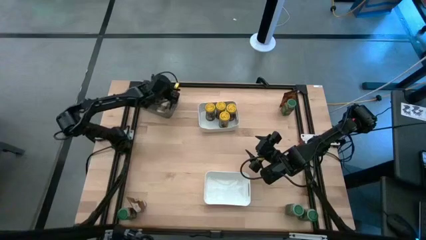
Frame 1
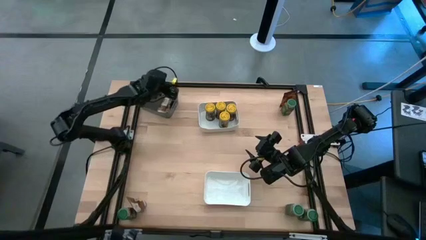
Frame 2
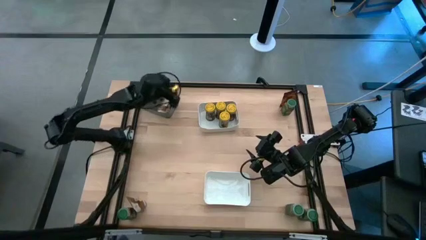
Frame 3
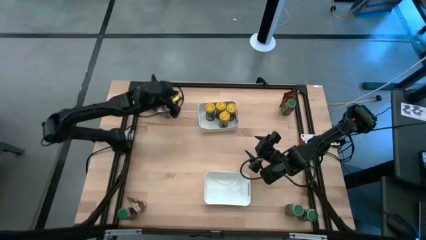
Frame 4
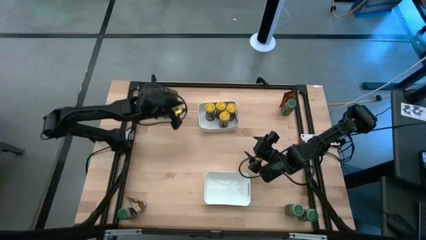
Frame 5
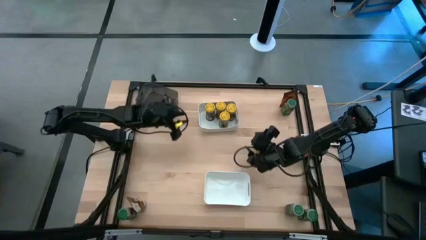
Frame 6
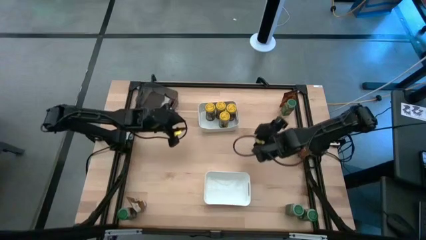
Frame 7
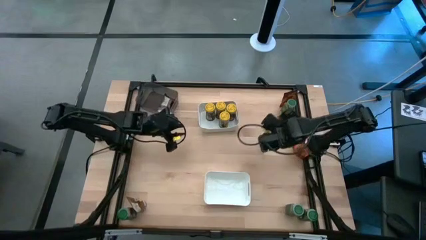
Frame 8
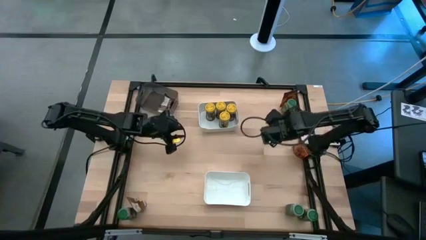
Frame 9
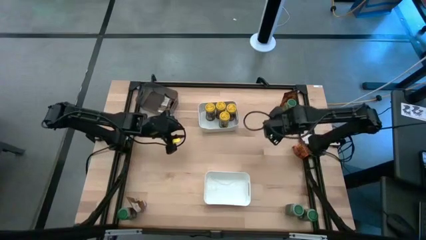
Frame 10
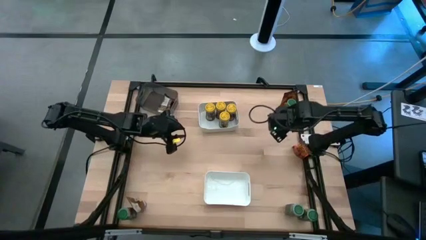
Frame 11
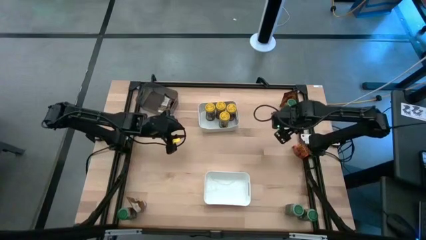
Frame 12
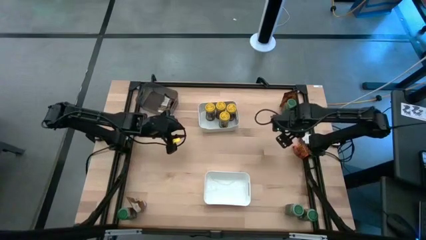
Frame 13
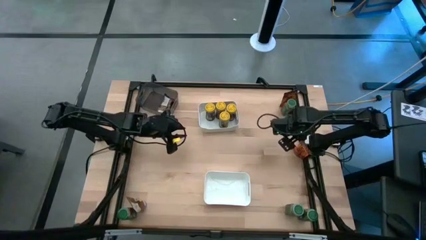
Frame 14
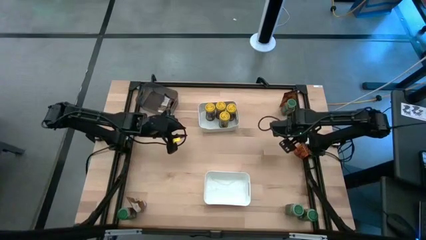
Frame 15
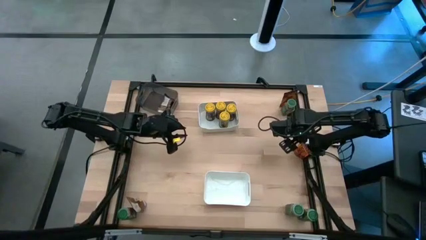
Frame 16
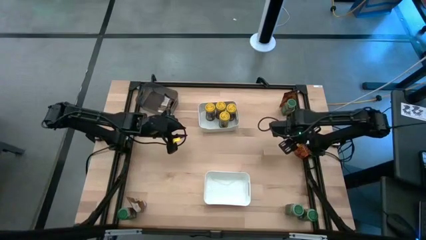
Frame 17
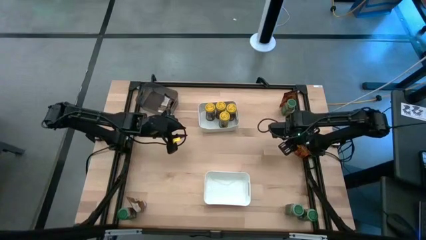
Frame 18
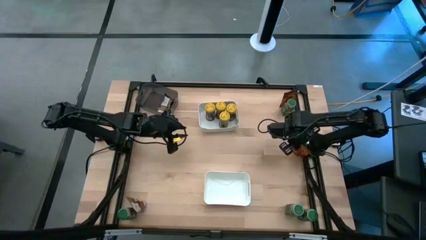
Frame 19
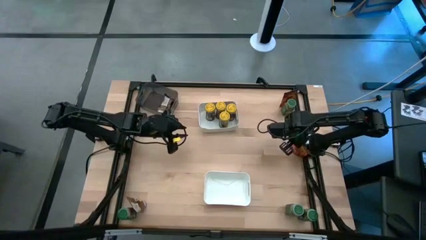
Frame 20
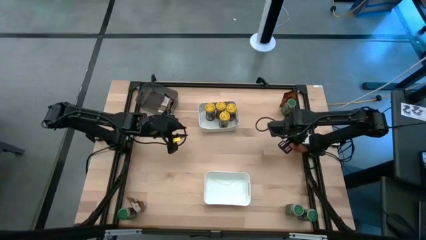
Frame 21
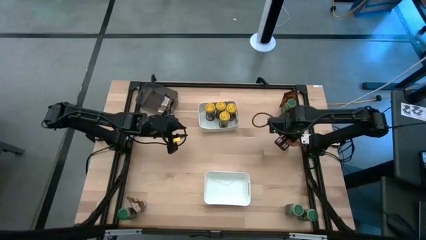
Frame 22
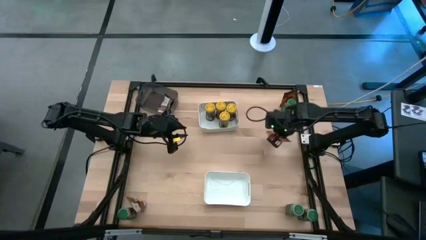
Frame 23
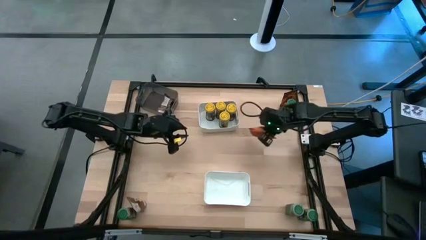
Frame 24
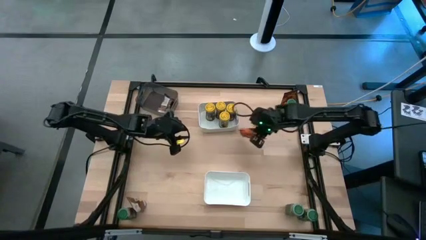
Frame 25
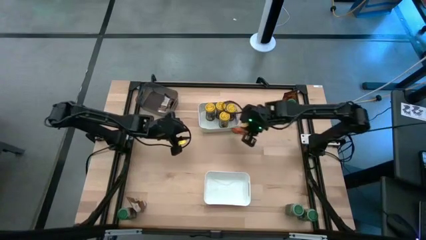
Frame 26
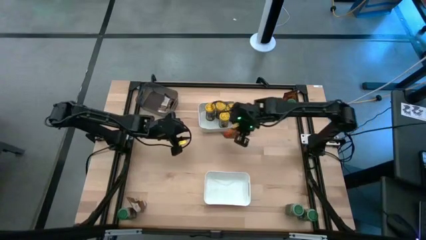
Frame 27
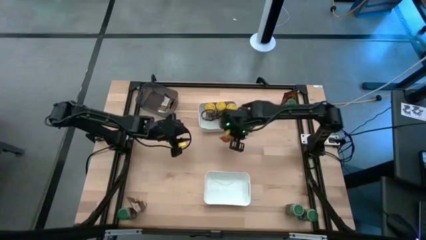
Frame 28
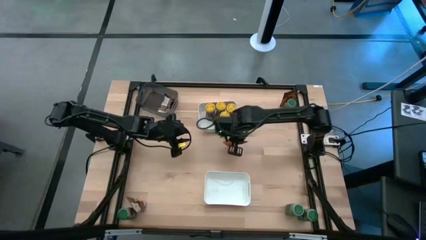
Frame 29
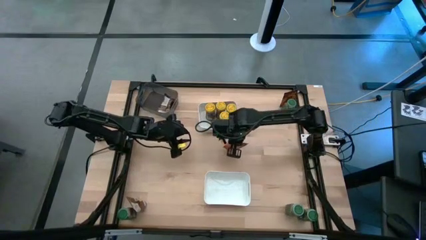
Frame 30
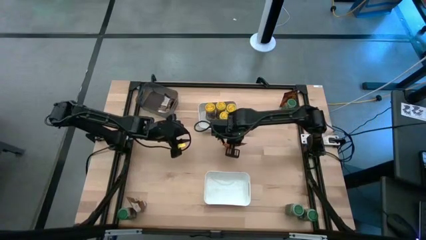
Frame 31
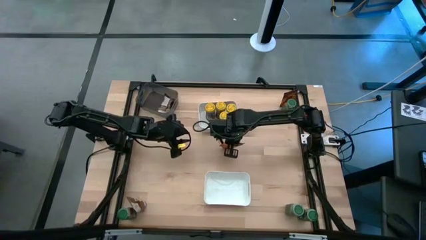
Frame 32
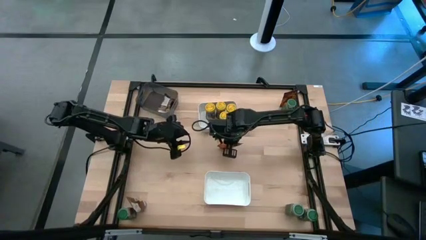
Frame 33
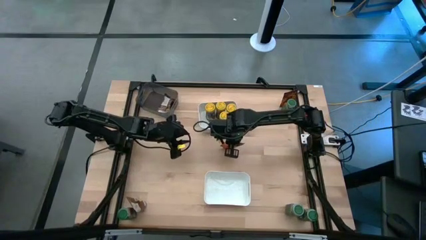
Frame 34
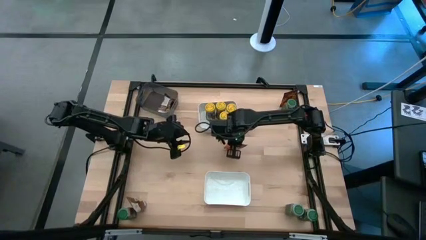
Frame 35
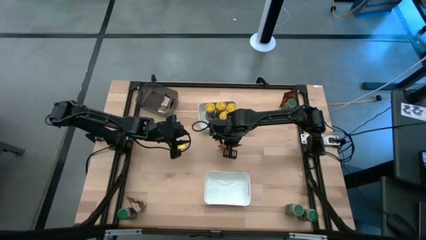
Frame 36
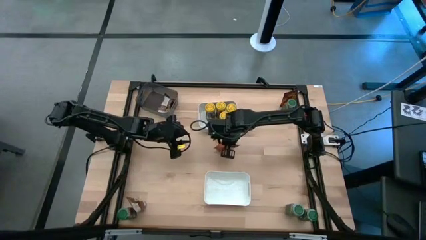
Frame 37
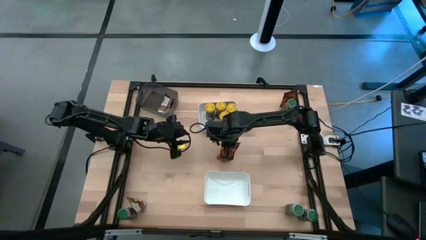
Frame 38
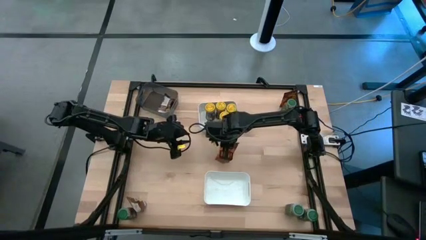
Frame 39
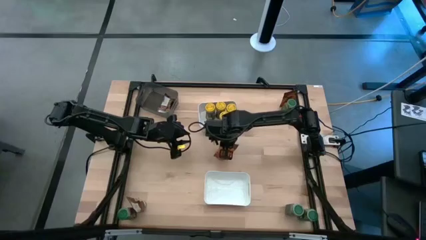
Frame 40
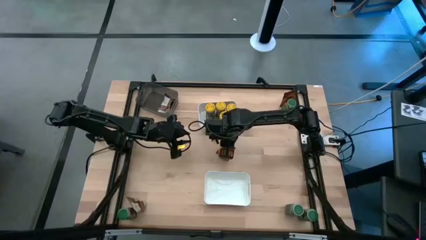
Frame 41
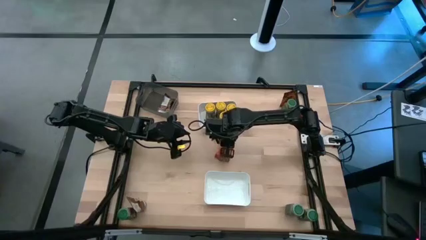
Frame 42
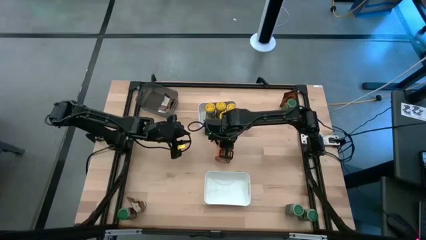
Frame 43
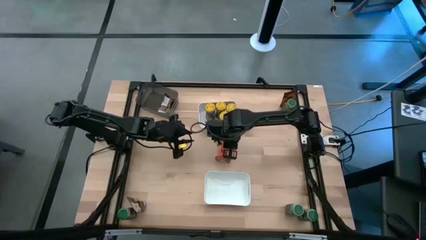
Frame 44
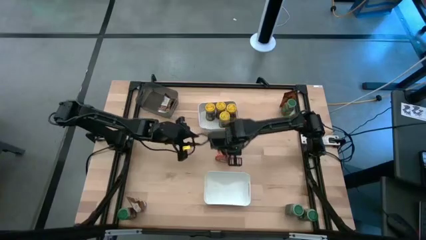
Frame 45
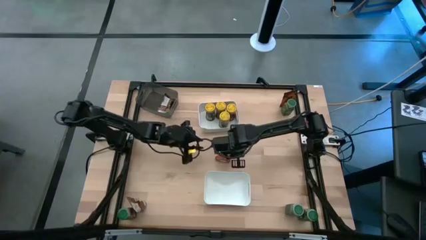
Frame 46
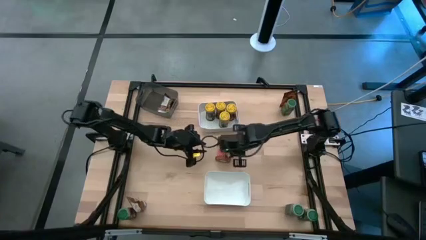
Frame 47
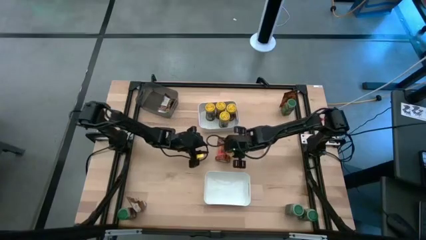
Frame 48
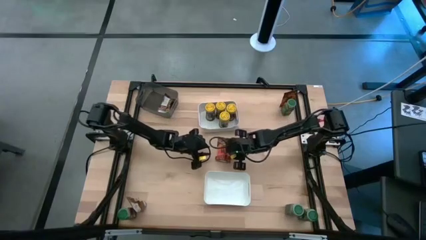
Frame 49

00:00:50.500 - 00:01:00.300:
Task: Sort spices by type
Put the orange seasoning pack into the black bin

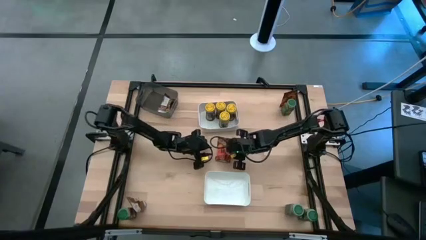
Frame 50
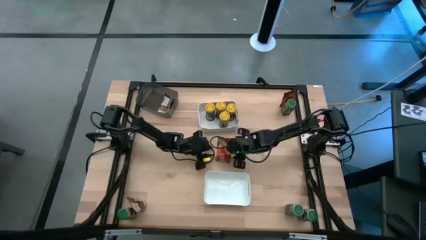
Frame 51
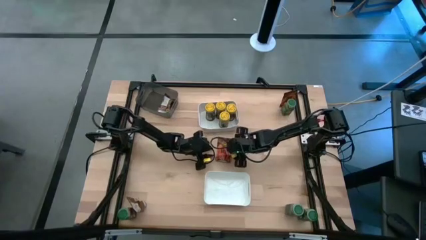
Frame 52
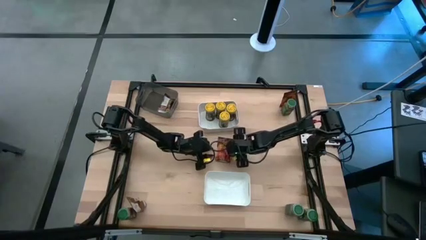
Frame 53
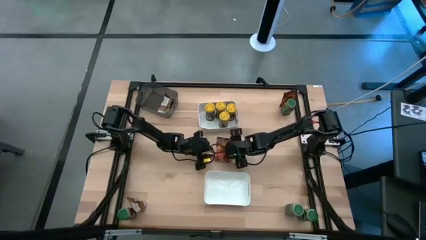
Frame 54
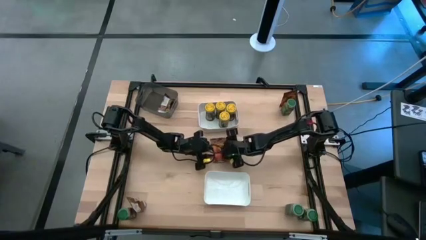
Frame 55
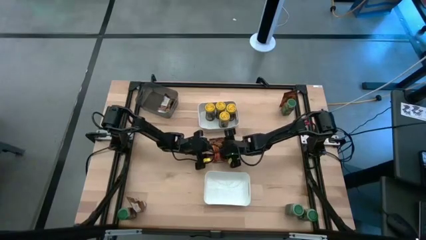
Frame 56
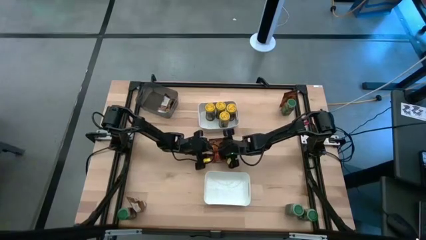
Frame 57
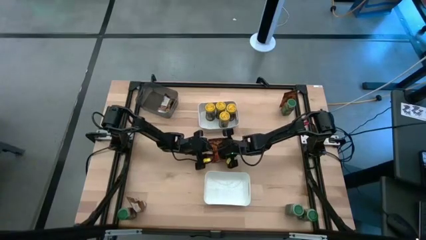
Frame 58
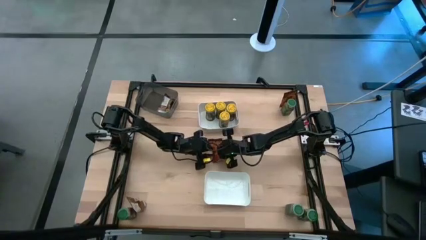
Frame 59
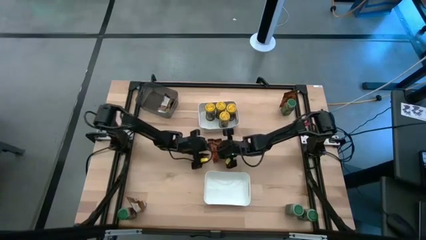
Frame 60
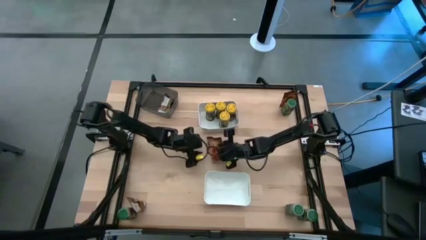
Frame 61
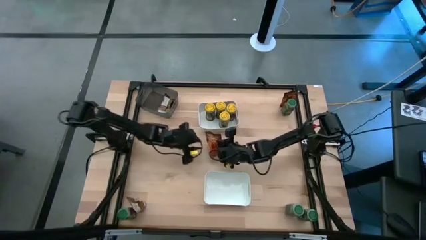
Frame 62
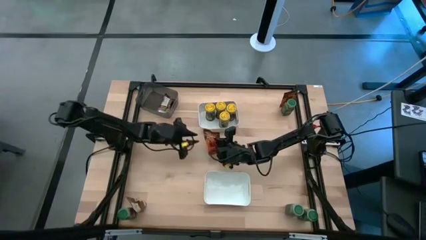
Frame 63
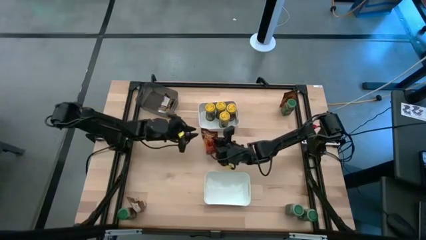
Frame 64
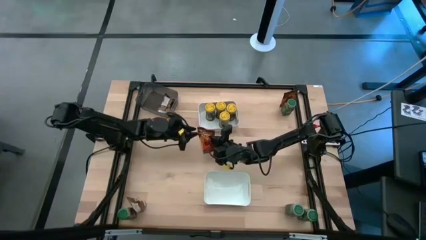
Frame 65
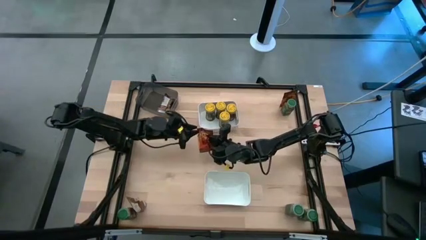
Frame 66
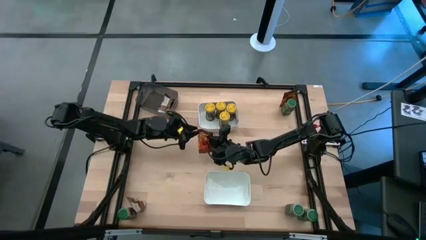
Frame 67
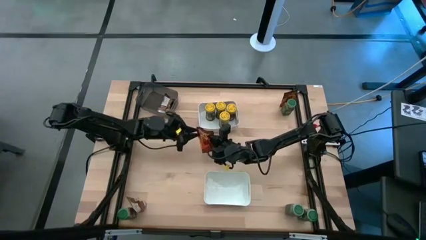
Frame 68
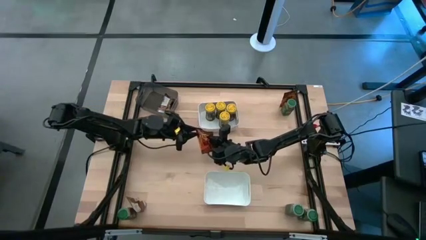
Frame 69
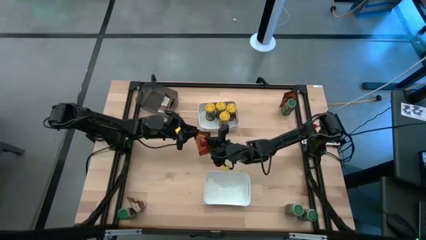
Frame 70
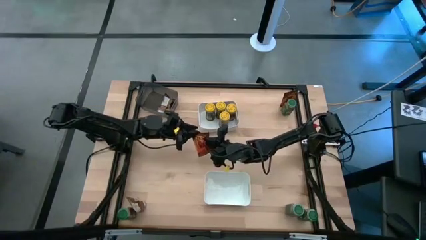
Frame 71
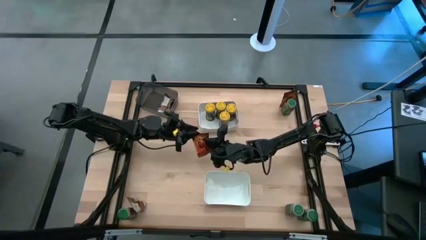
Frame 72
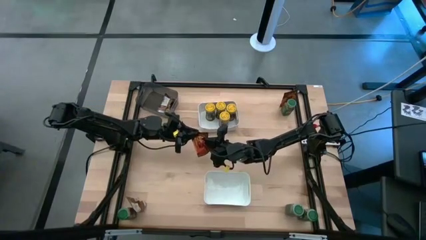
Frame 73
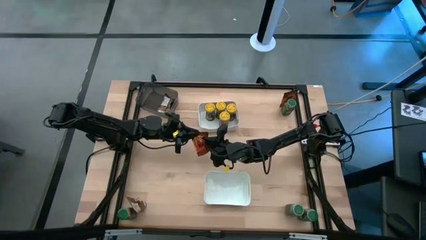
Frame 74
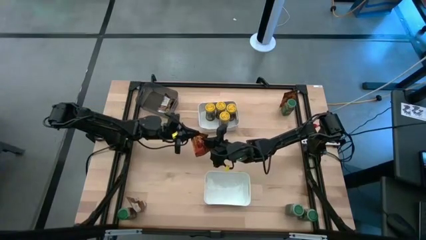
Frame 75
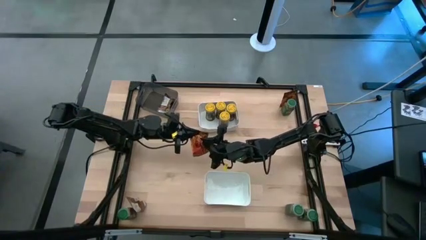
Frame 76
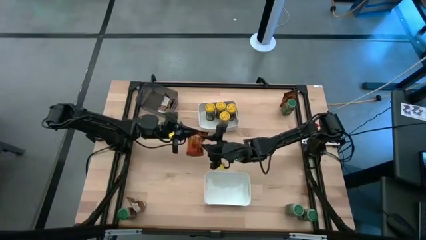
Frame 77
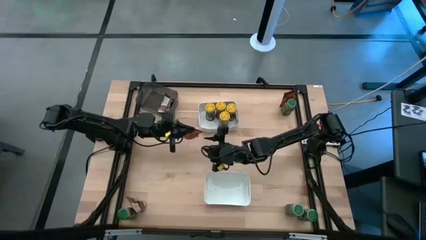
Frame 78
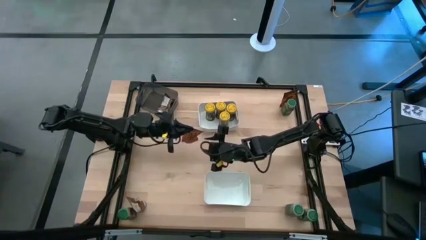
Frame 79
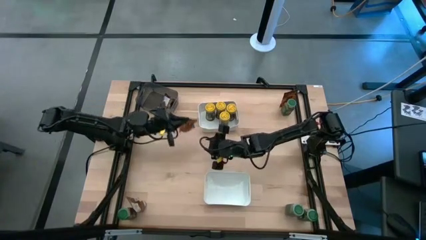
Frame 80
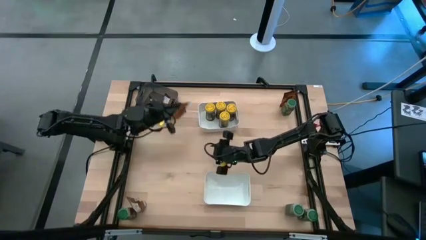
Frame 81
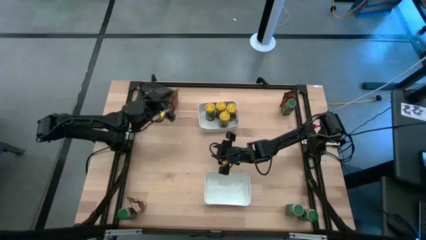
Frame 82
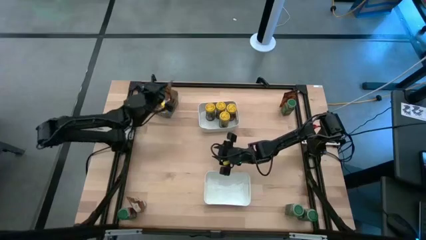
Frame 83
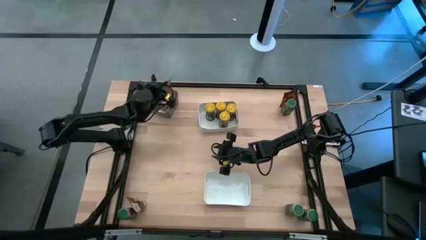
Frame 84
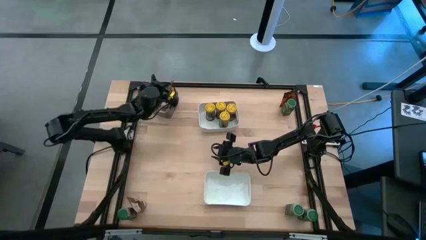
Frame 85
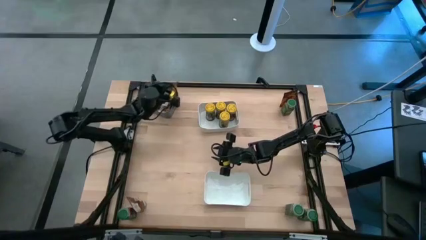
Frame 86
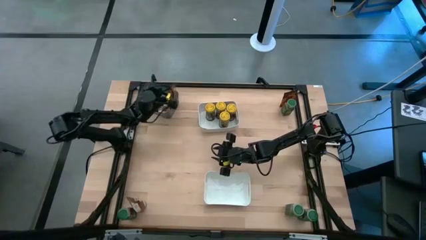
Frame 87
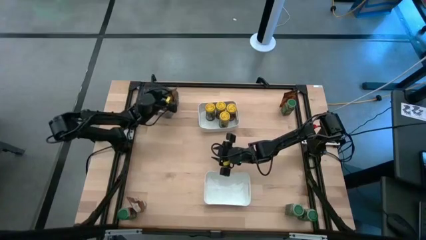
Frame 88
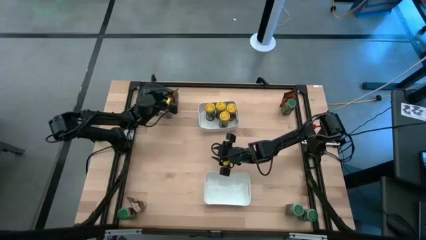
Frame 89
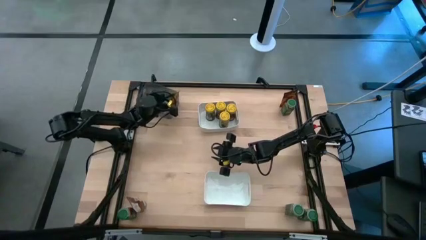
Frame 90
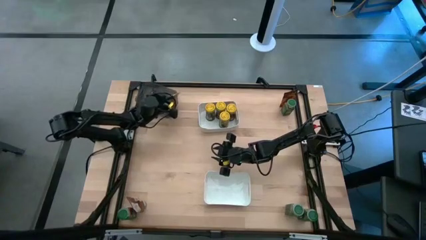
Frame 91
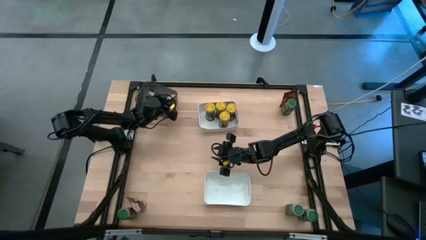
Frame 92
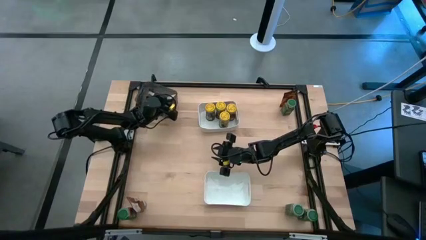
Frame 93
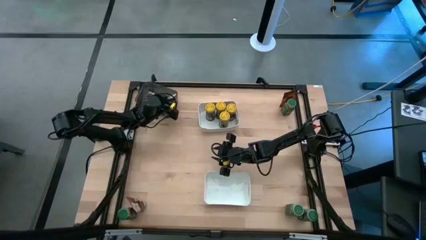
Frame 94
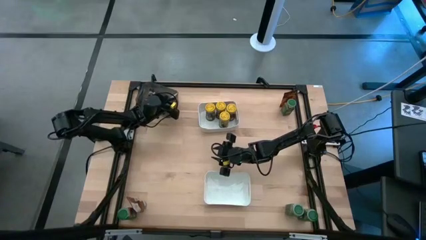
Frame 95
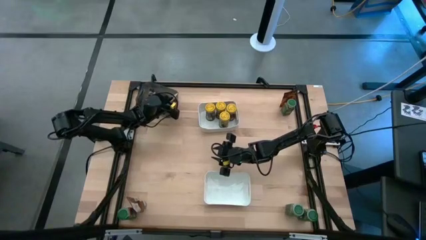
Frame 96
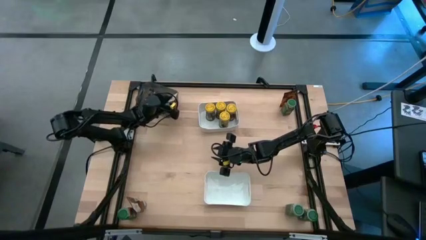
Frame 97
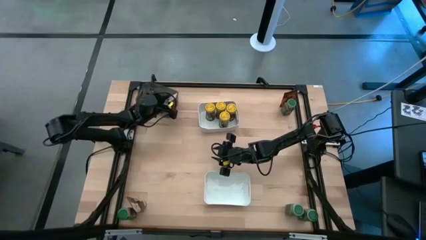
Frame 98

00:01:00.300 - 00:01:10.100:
Put the orange seasoning pack into the black bin
